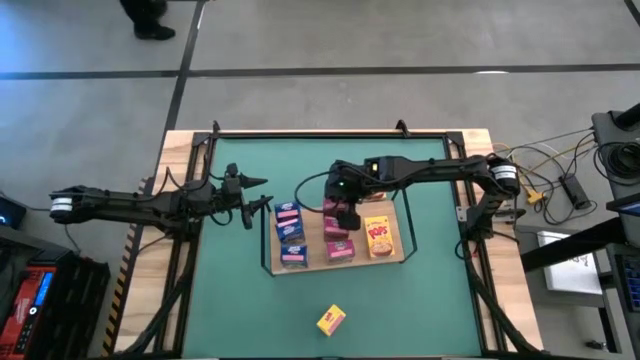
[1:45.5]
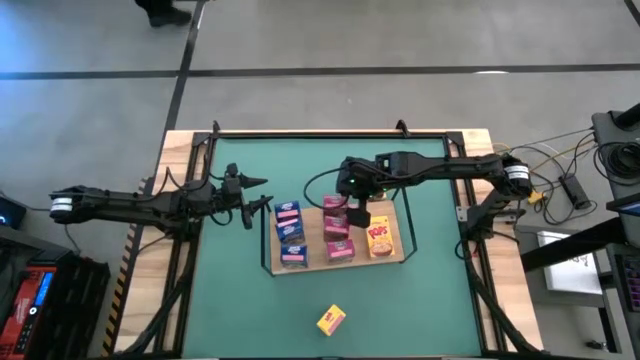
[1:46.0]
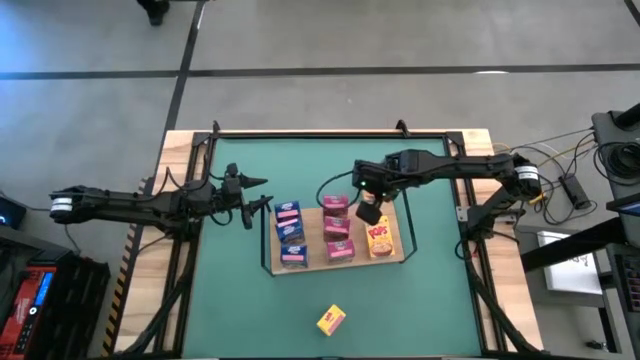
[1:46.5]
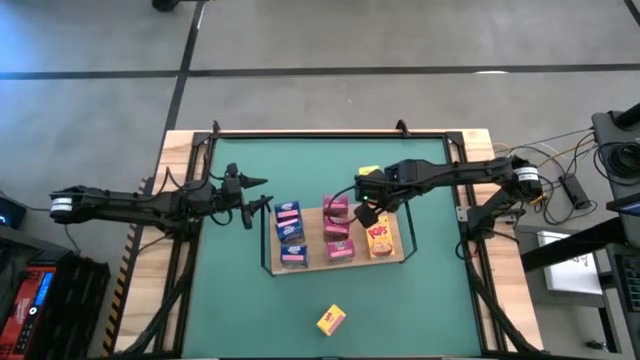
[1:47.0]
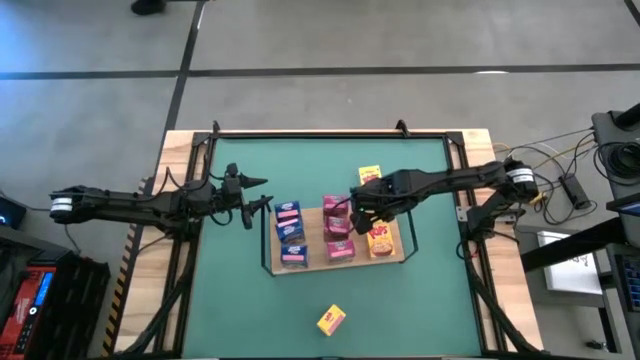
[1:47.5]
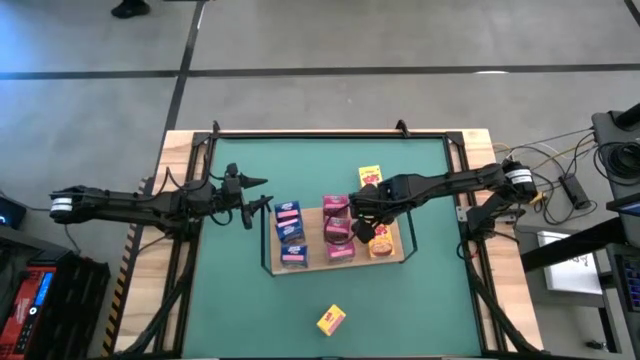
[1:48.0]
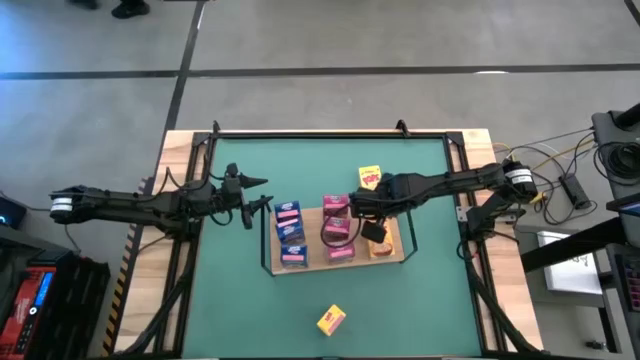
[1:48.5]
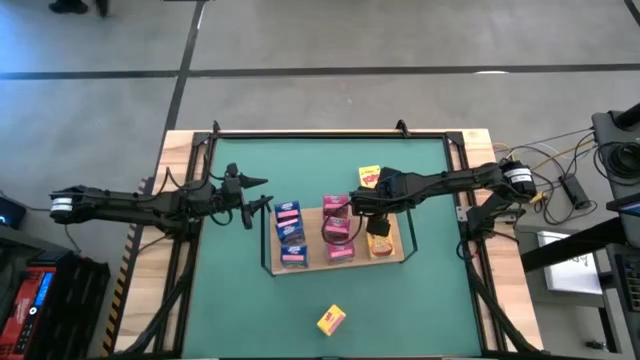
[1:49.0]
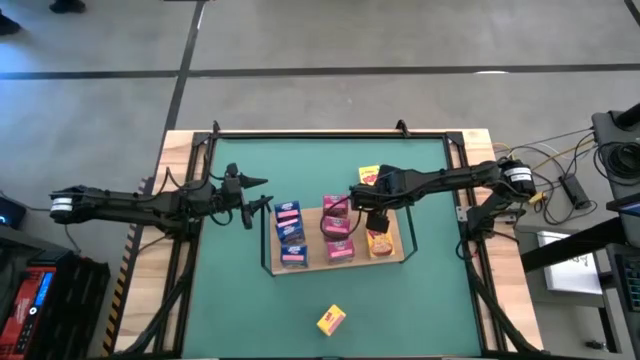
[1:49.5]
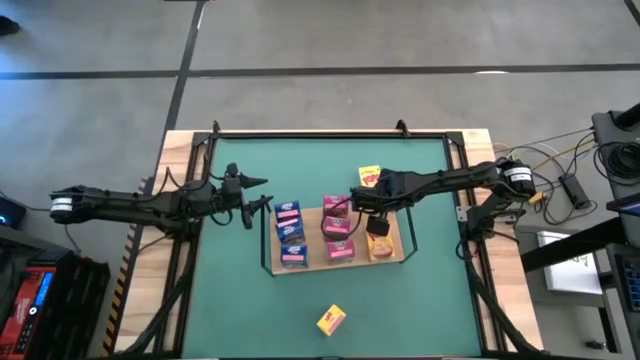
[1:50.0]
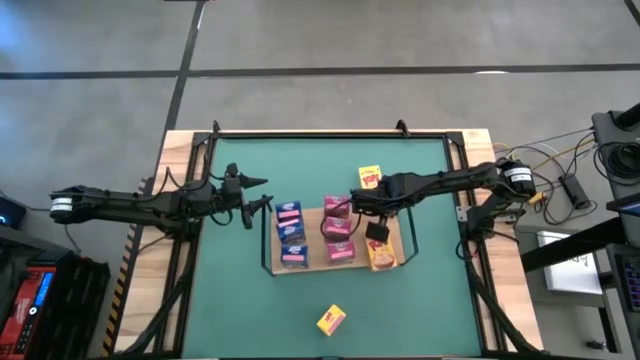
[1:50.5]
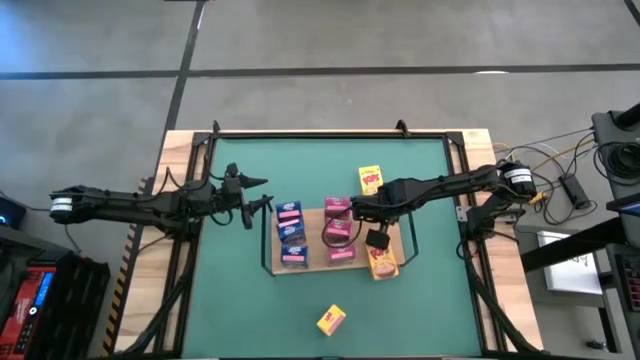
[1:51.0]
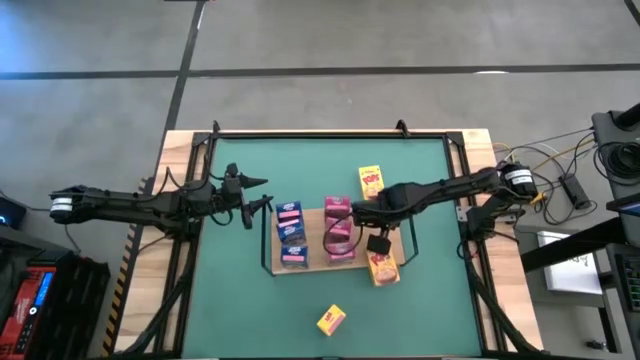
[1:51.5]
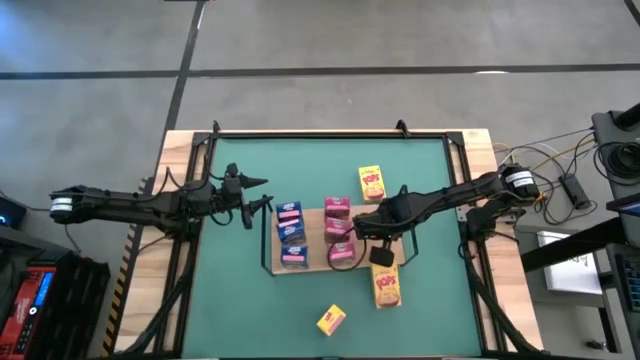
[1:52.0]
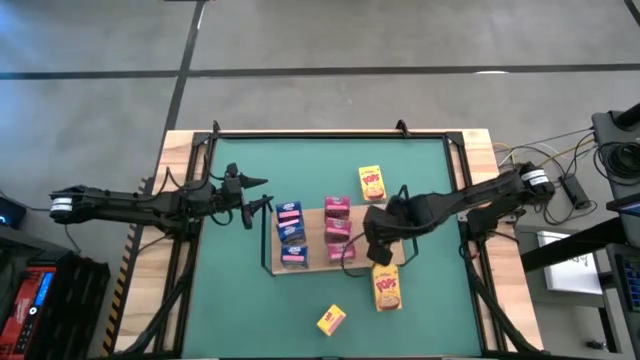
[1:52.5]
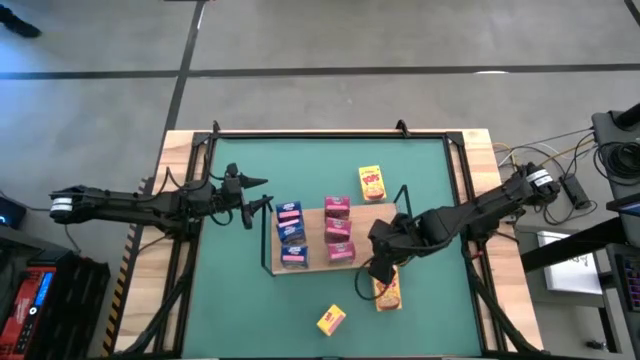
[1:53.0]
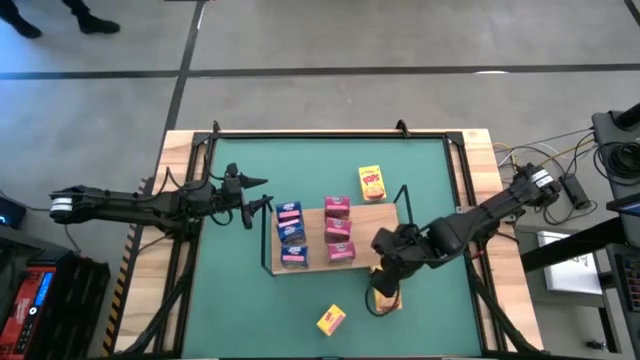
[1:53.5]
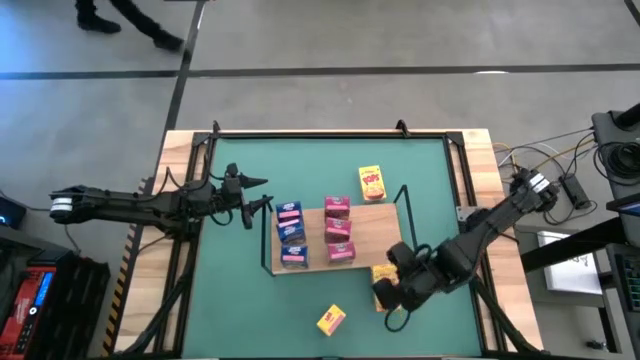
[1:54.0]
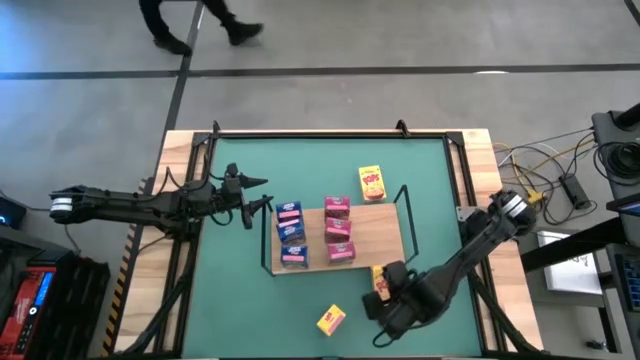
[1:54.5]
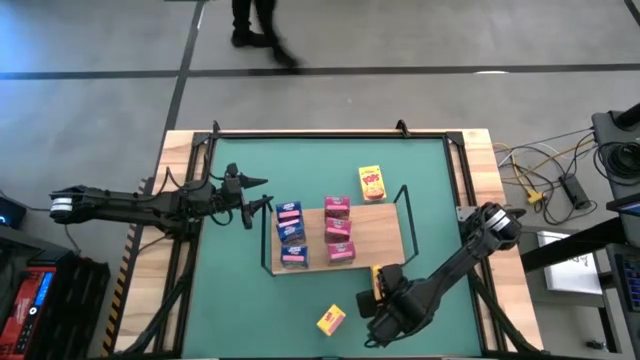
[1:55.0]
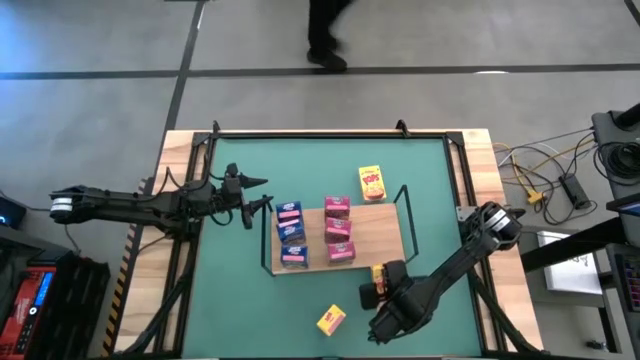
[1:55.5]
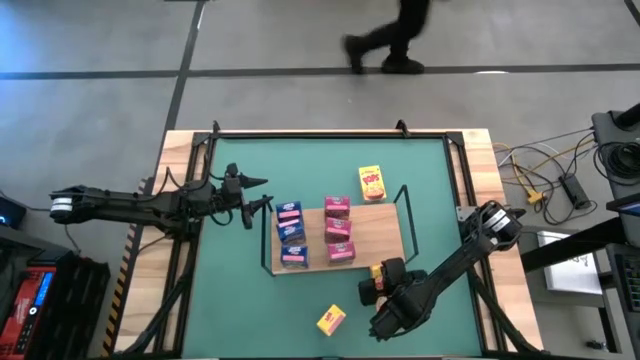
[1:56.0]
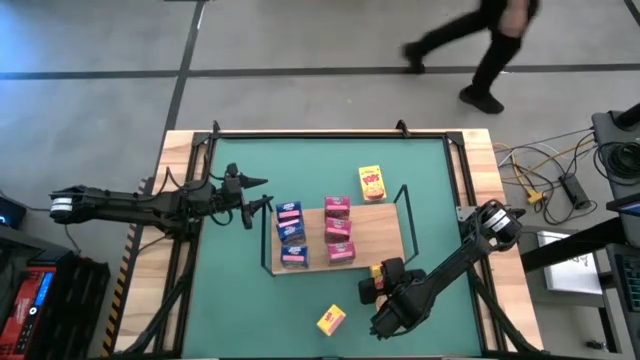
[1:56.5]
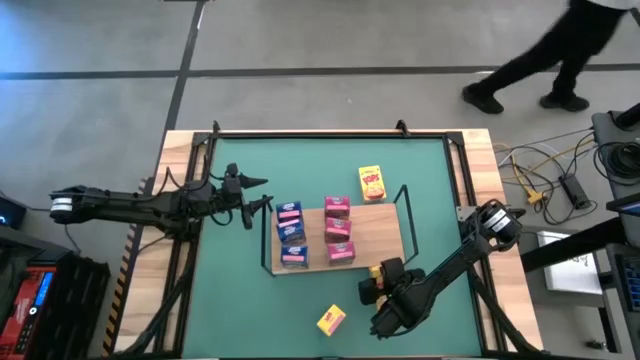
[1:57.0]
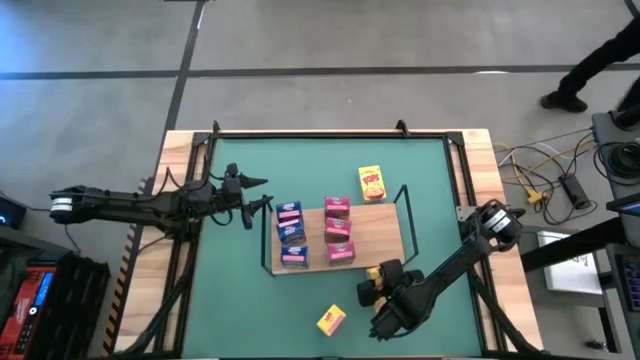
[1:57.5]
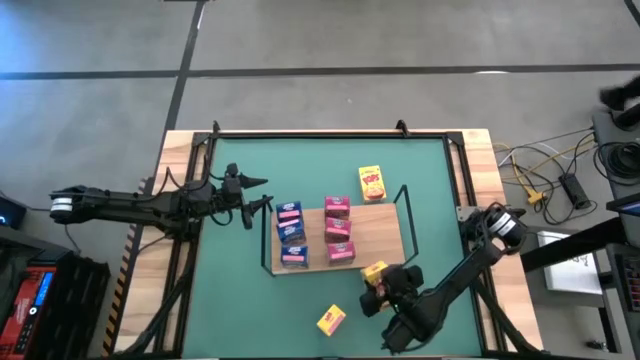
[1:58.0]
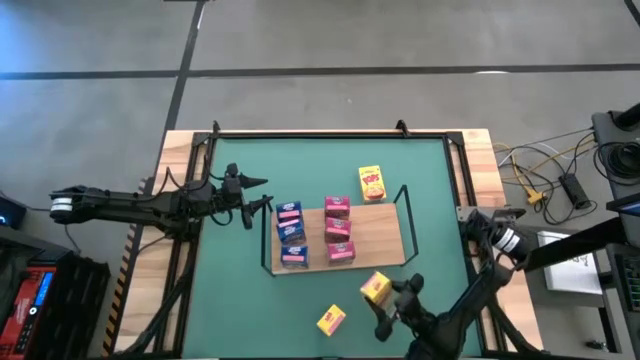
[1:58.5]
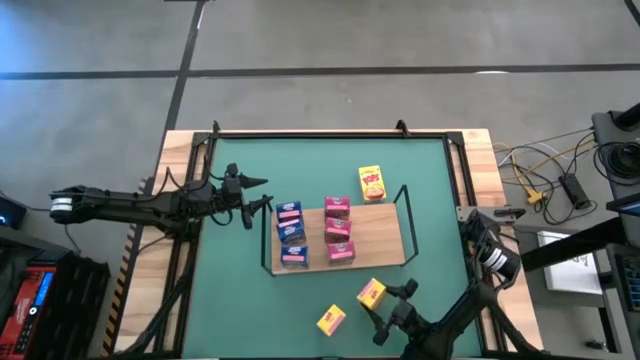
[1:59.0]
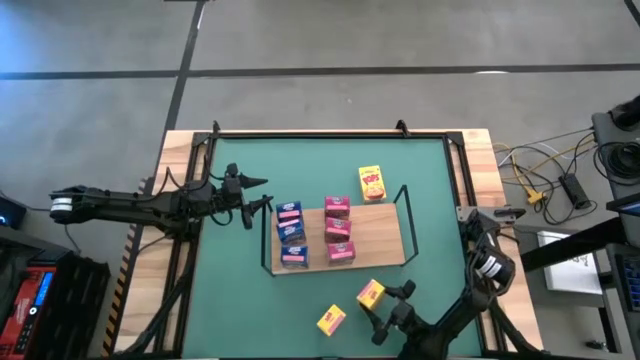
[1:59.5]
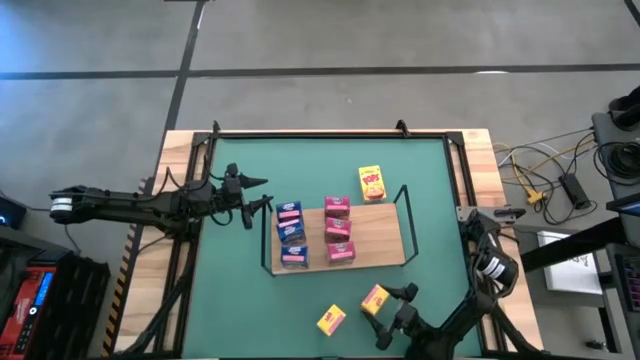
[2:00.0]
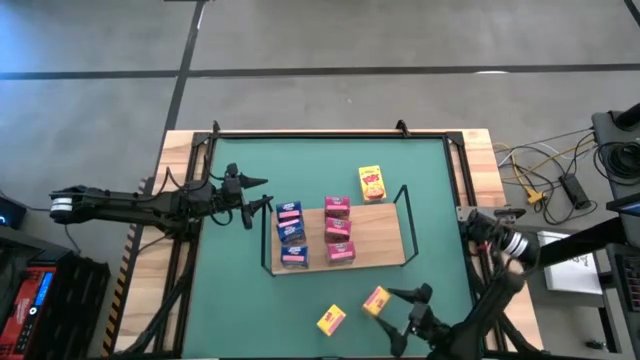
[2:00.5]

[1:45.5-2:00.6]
Task: Stack cereal on shelf
Remove the yellow cereal box from the shelf

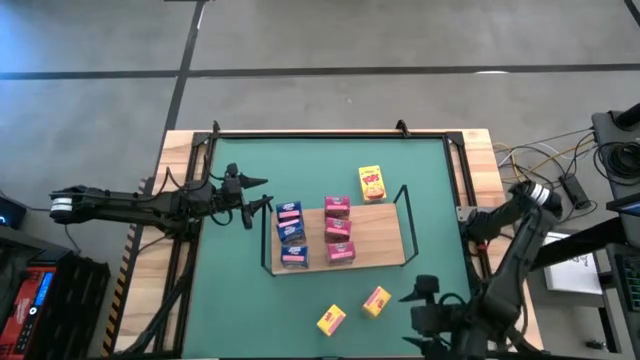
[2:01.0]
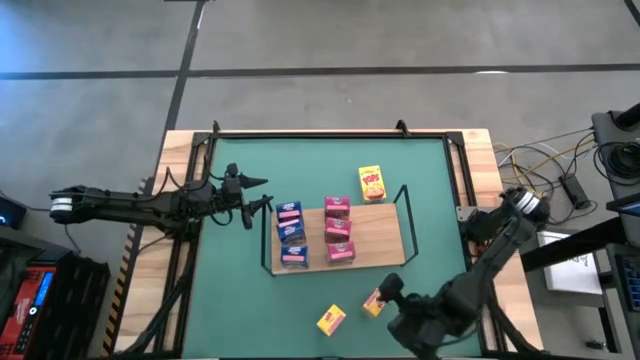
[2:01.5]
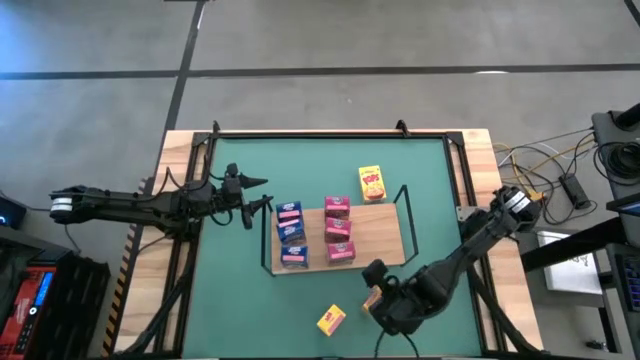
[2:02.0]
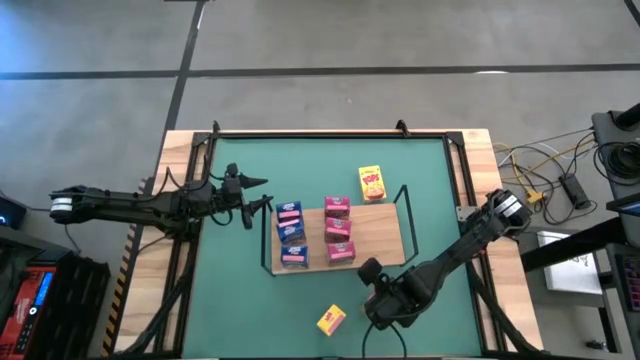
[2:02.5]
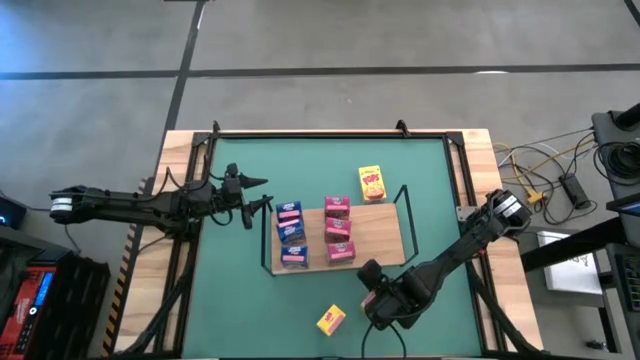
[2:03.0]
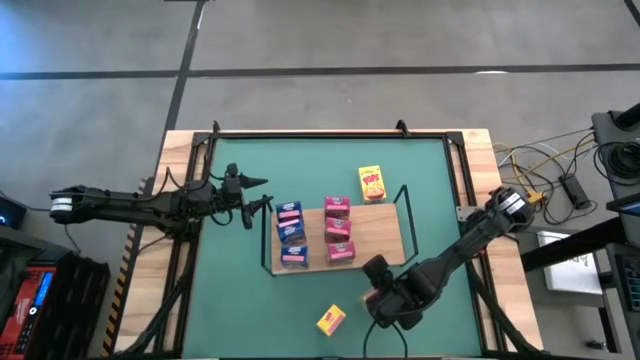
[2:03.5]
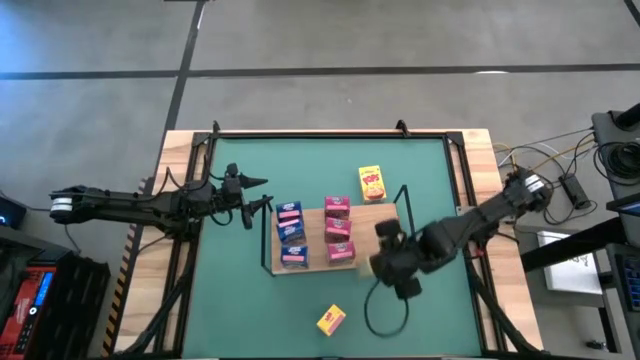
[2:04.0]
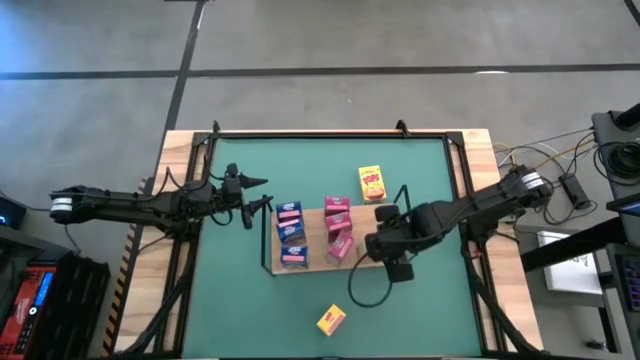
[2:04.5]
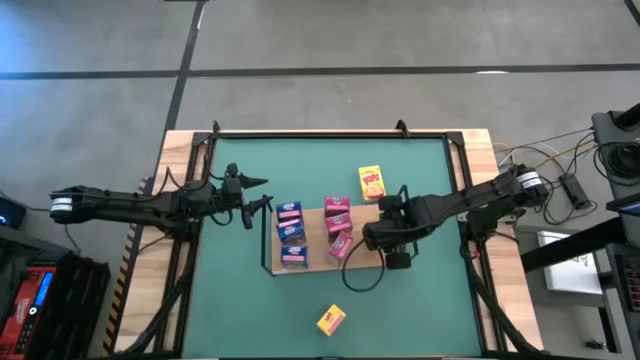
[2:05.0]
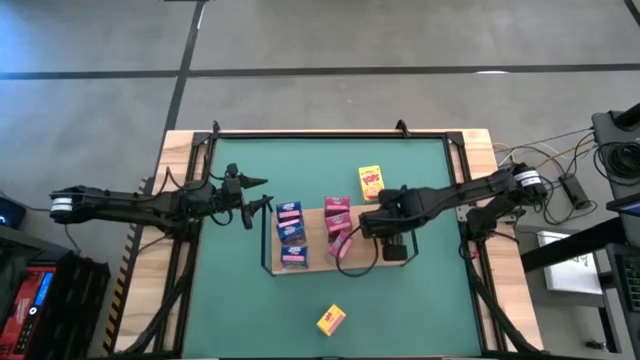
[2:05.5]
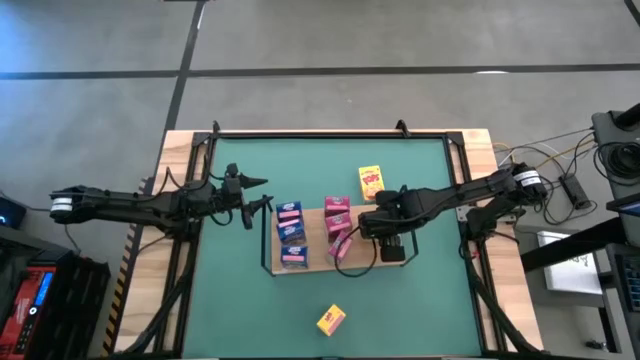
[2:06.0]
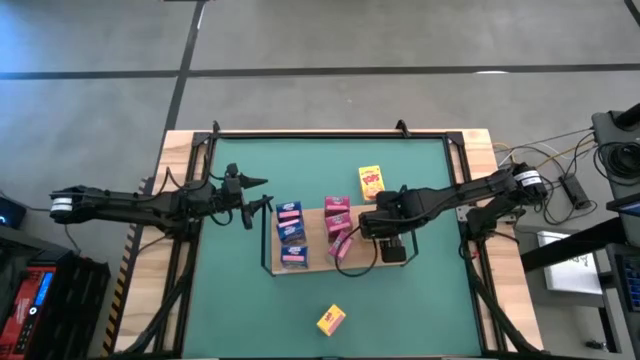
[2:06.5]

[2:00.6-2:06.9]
Put the bottom right yellow cereal box on the shelf

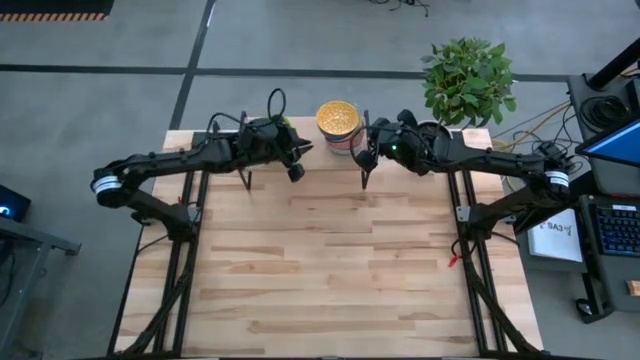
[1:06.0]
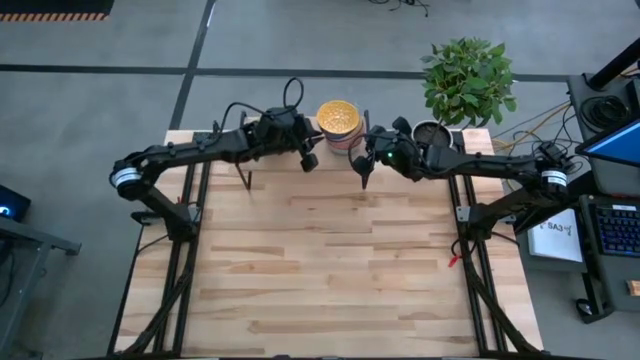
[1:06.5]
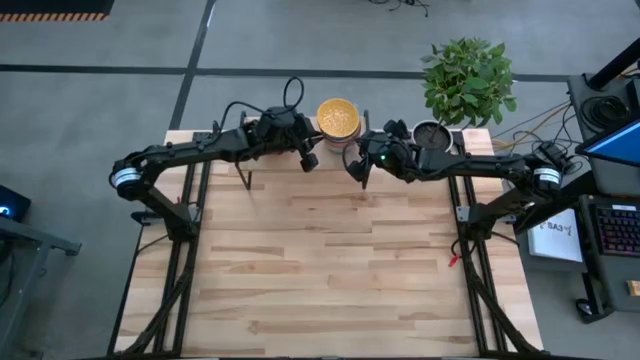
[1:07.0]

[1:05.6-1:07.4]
Task: Place and stack bowls onto a shelf
Adjust the stacked patterned bowls on the shelf
